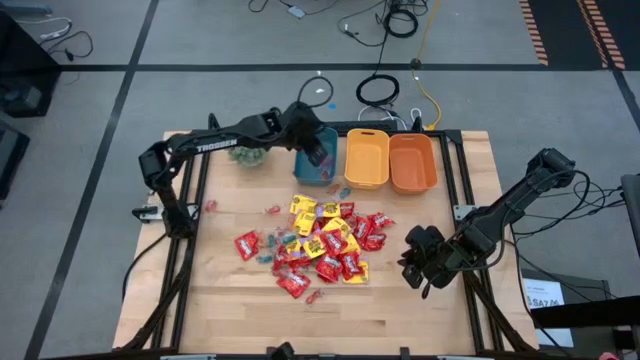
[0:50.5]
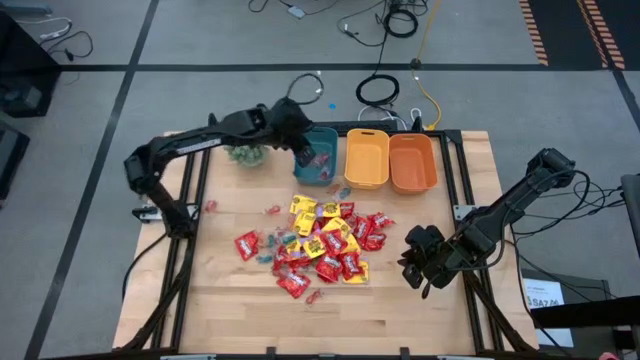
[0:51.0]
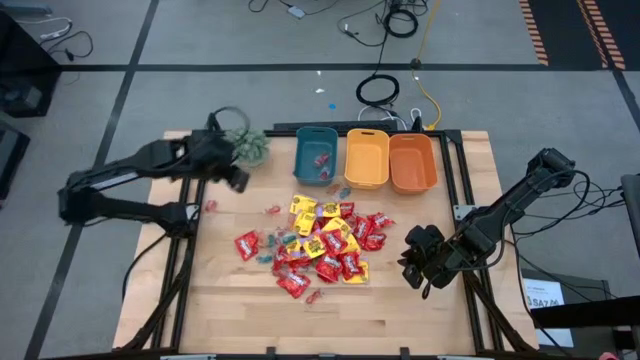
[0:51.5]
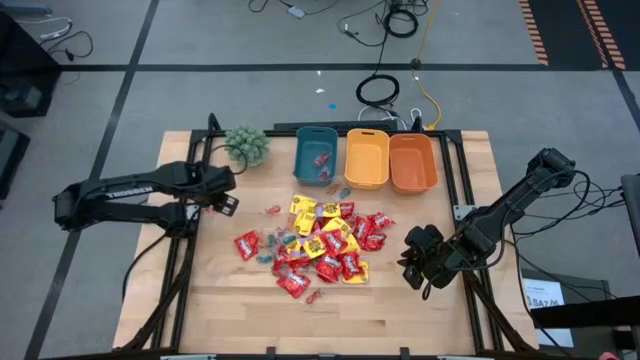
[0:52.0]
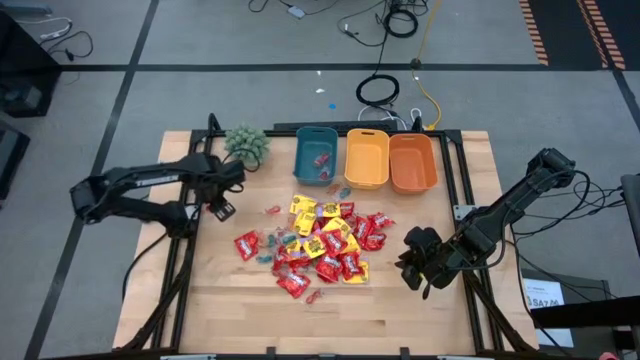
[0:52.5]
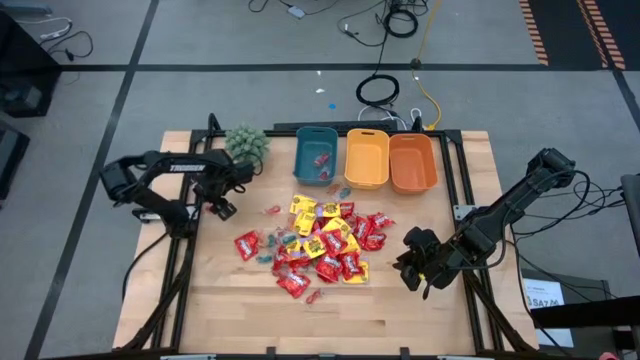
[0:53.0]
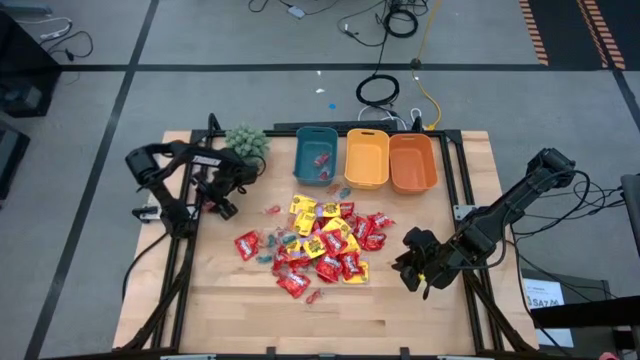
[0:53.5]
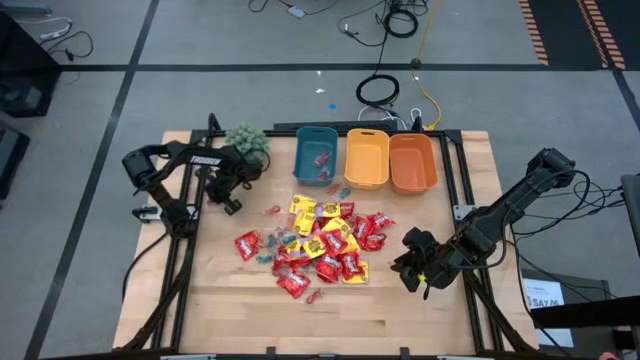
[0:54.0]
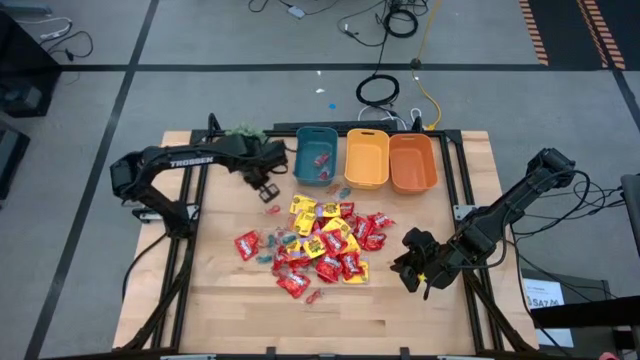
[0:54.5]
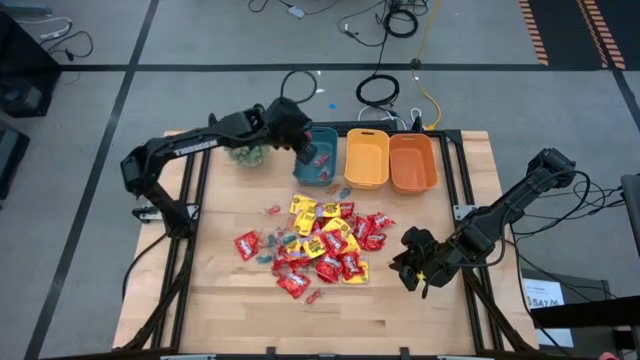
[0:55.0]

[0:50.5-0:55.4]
Task: Sort candy
Put the orange gummy into the blue bin

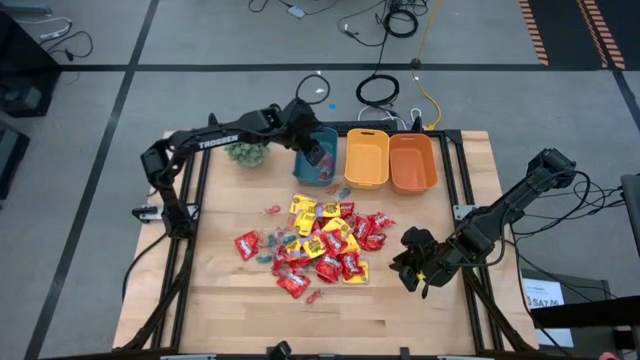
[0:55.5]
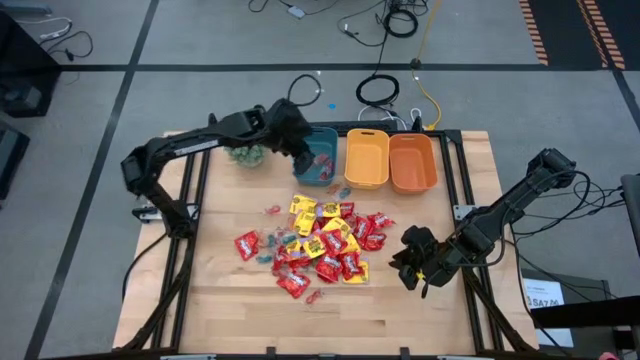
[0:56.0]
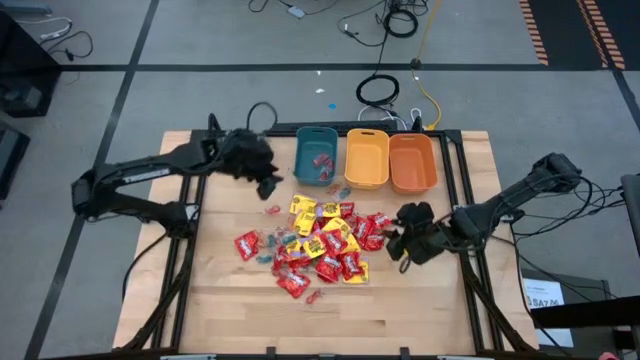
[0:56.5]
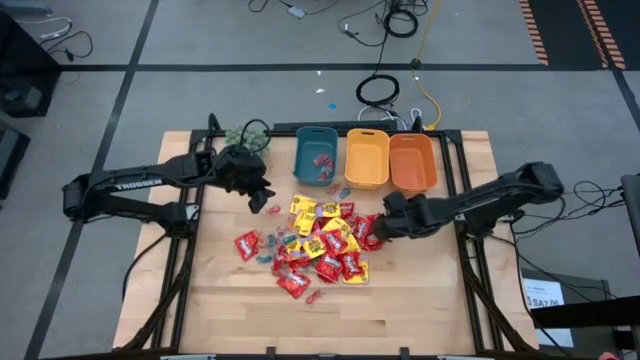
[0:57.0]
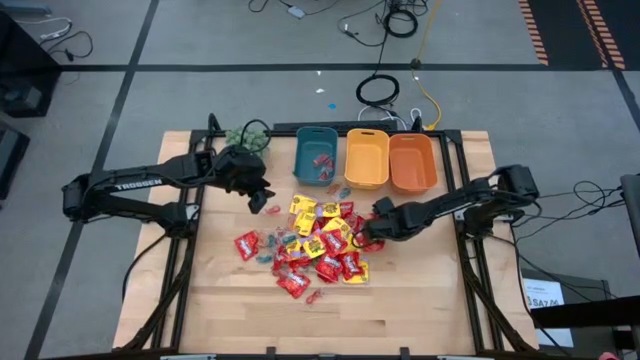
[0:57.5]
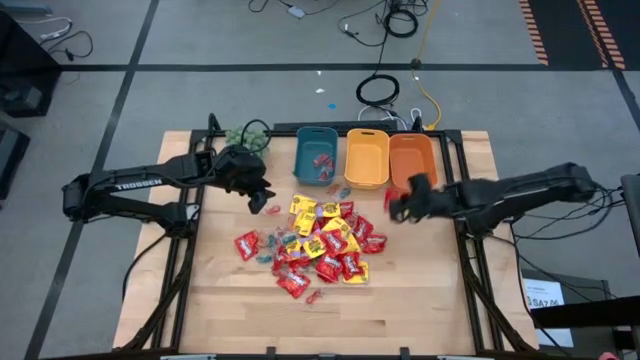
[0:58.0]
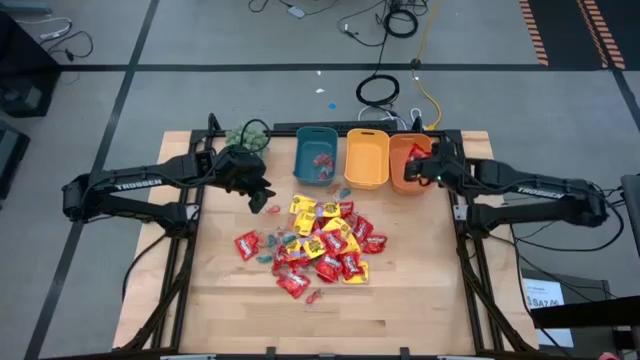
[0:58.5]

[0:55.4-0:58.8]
Put the red candy into the orange organizer bin

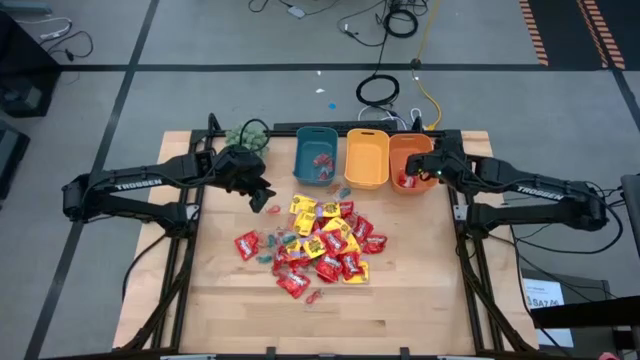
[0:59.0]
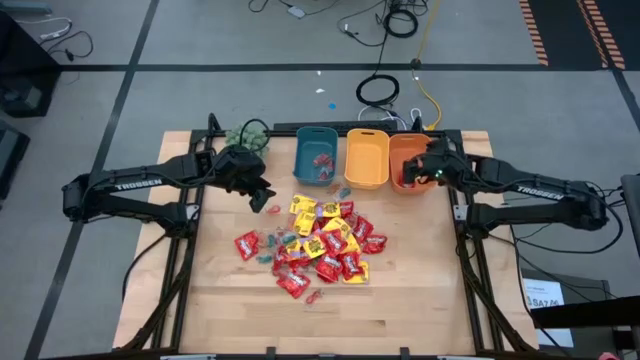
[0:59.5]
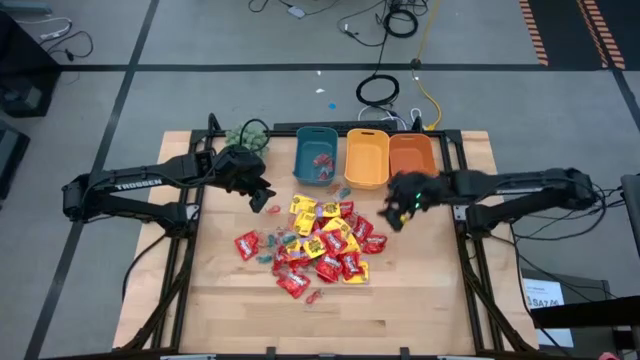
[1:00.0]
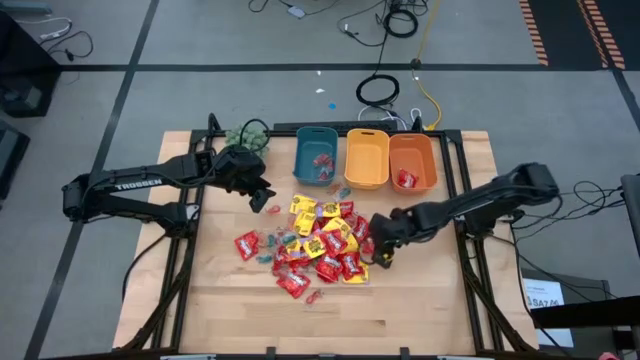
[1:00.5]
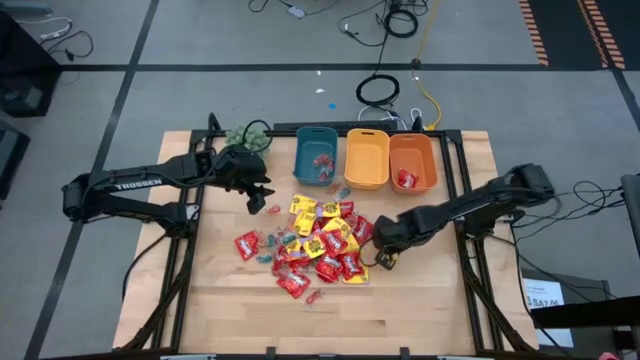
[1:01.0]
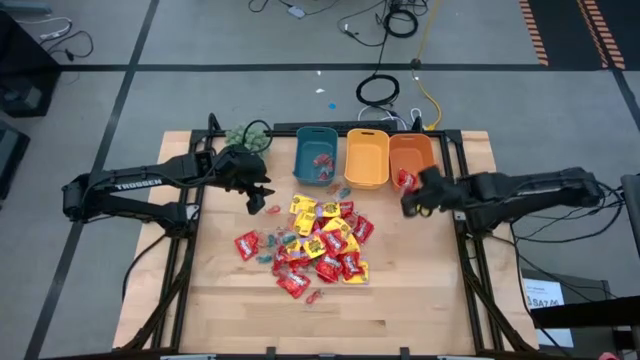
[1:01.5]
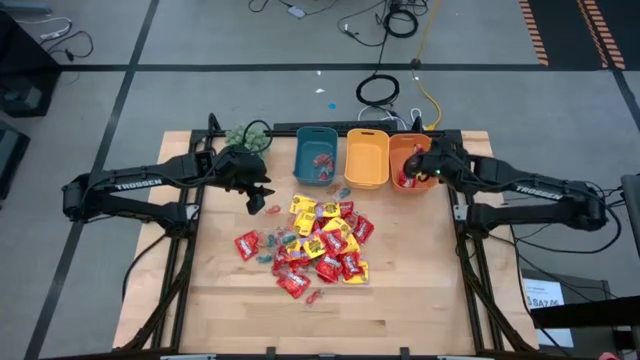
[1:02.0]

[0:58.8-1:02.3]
Put the red candy into the orange organizer bin

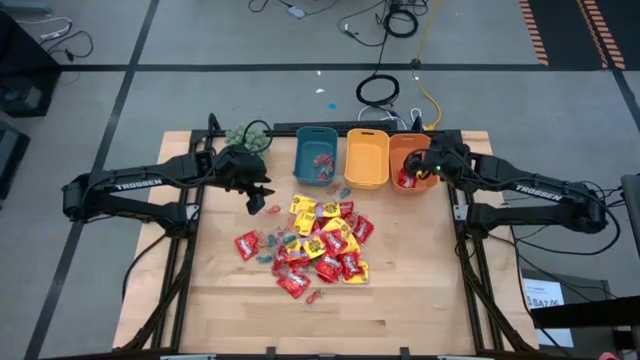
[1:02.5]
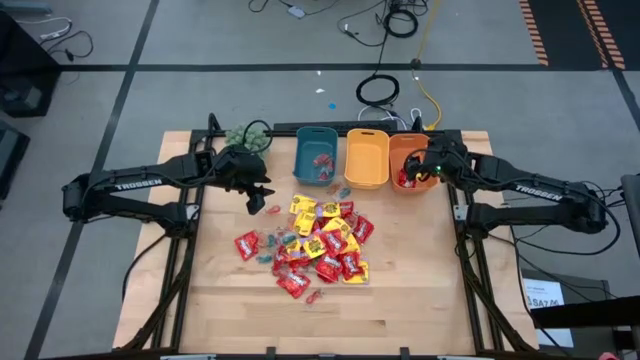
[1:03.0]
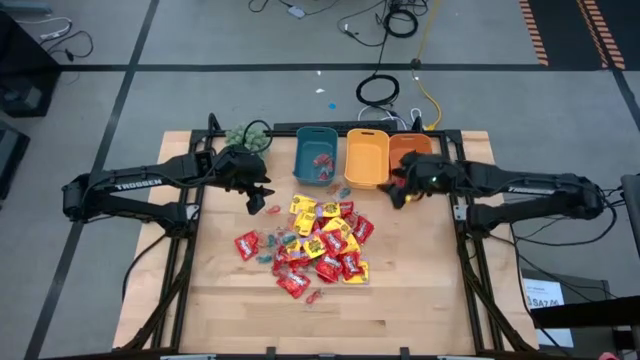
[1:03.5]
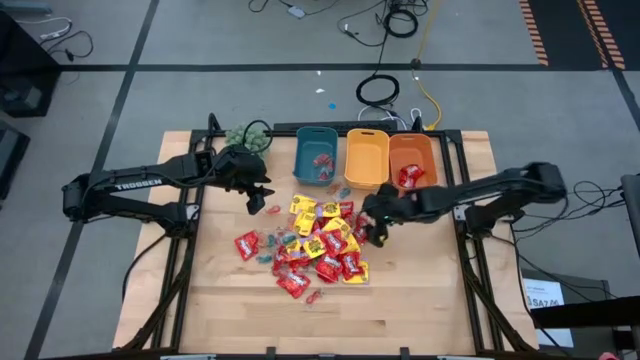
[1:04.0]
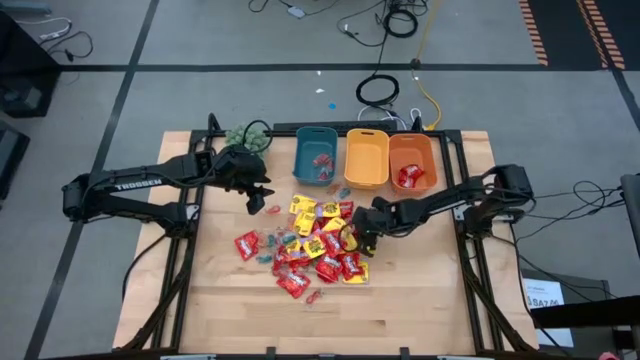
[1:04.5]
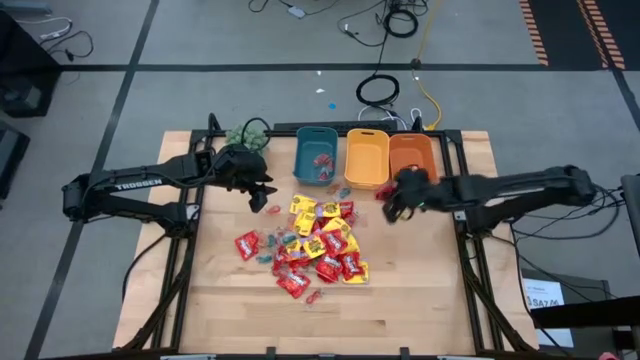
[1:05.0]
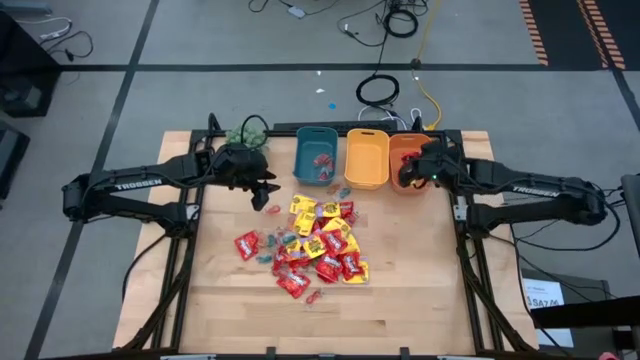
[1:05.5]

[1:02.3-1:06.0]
Put the red candy into the orange organizer bin

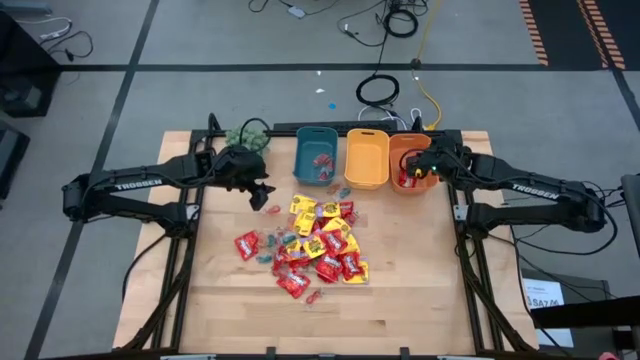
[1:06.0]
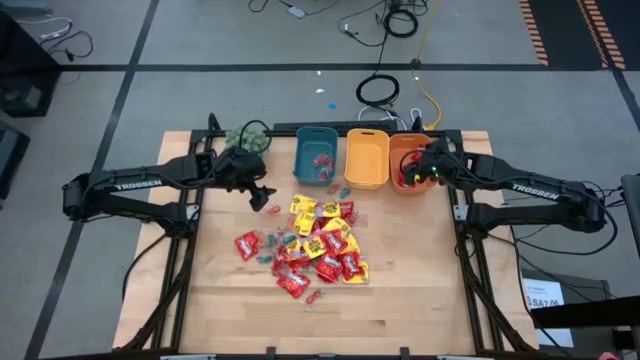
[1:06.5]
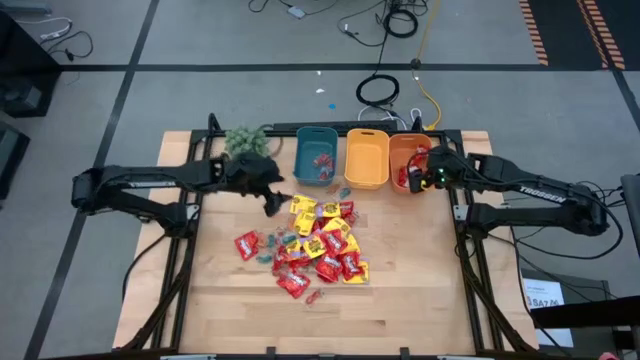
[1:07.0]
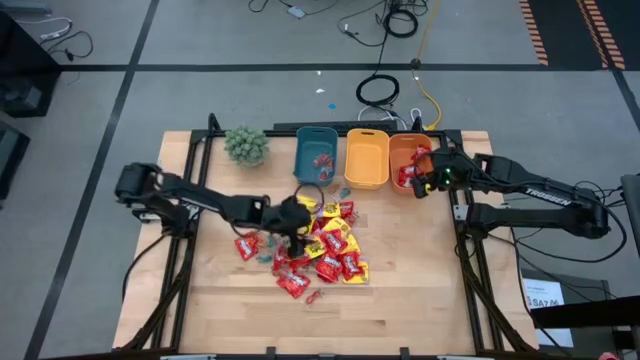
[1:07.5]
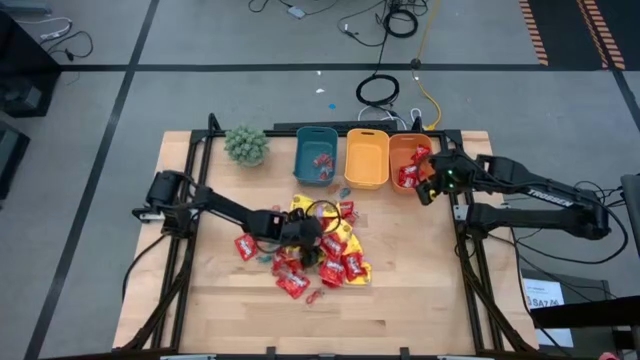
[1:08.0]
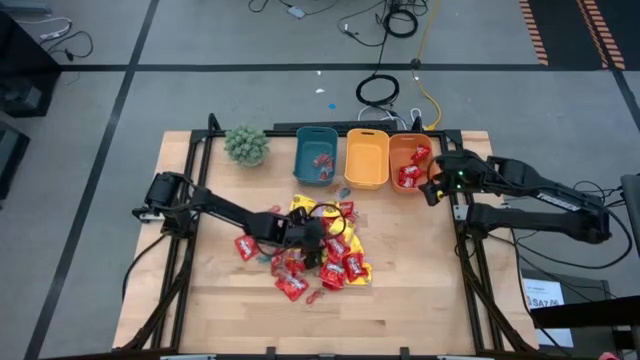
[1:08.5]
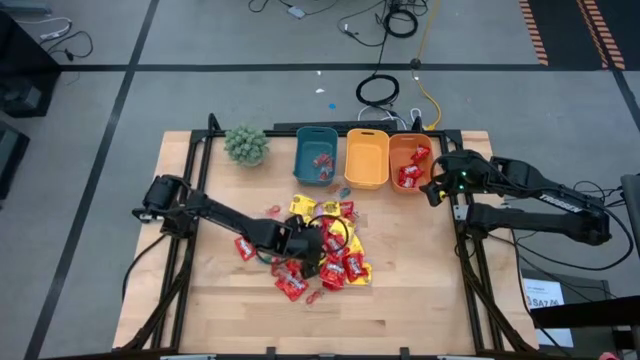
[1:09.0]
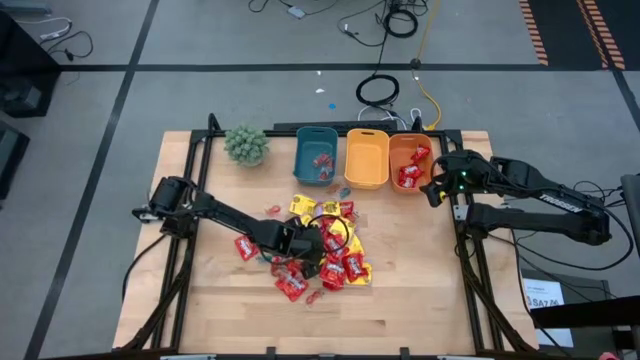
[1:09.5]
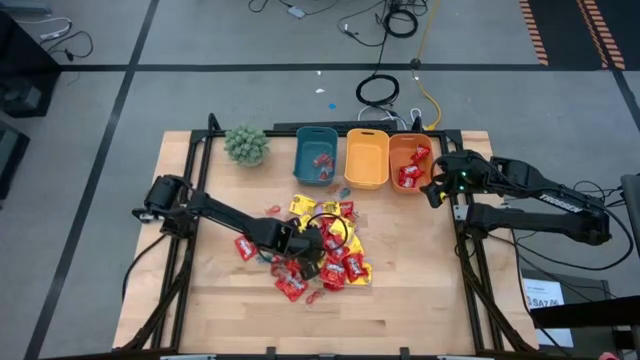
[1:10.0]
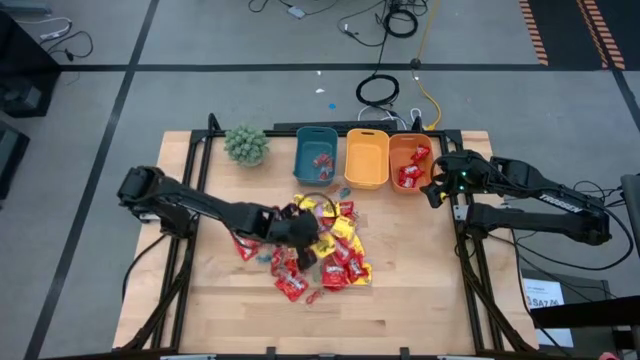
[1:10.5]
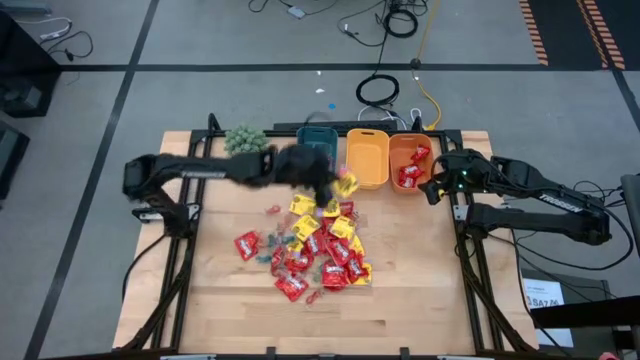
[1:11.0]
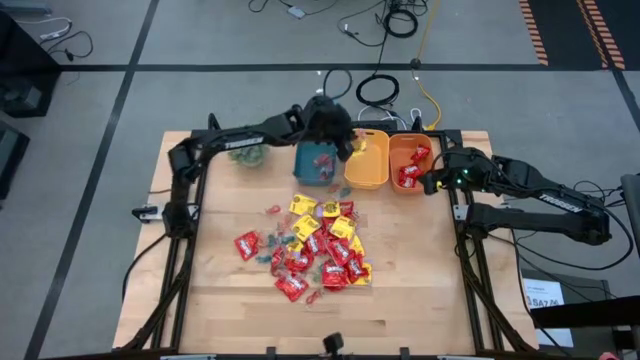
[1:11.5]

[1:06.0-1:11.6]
Put the yellow candy into the yellow bin
